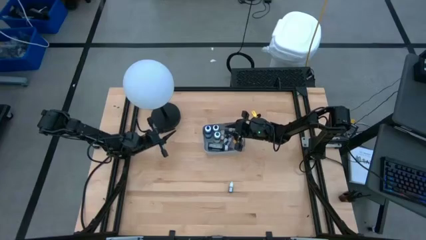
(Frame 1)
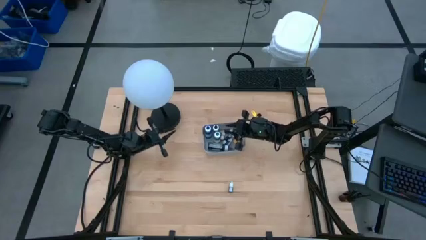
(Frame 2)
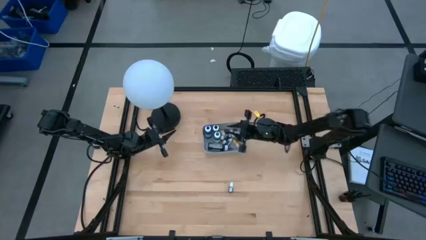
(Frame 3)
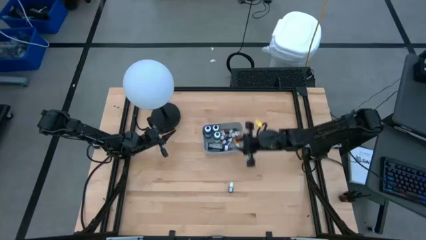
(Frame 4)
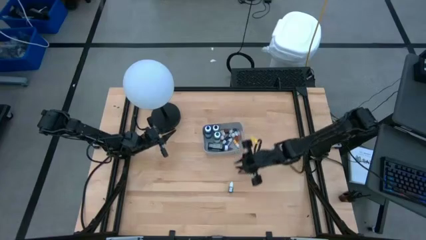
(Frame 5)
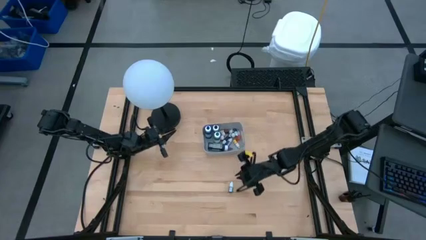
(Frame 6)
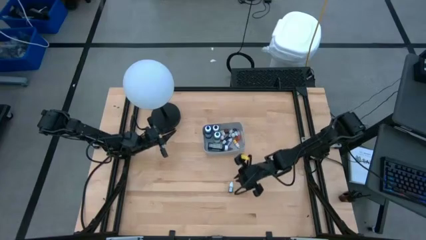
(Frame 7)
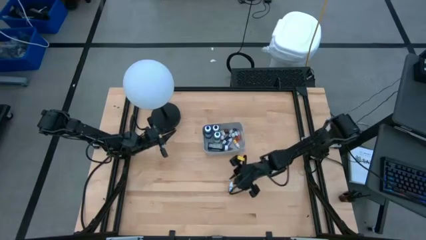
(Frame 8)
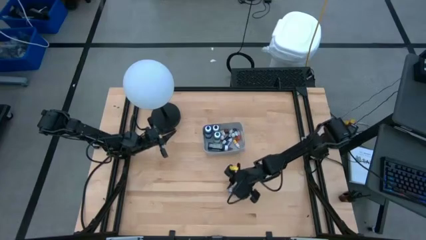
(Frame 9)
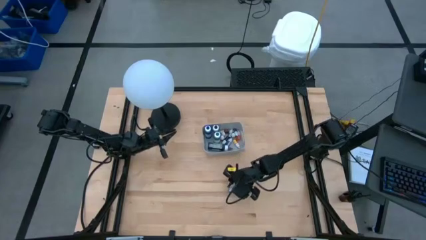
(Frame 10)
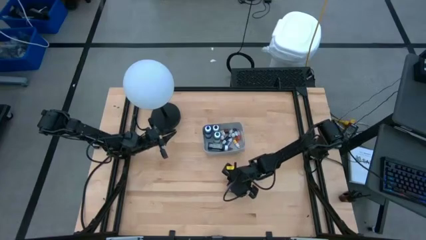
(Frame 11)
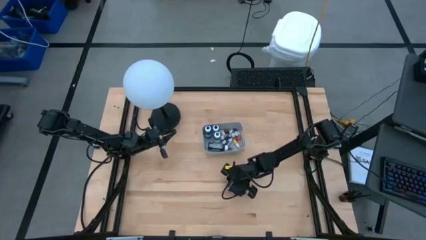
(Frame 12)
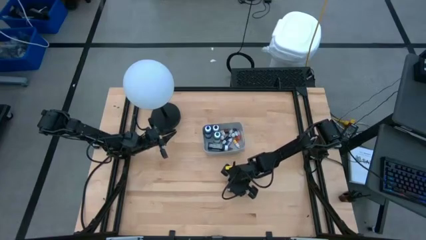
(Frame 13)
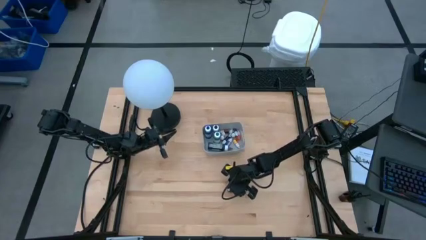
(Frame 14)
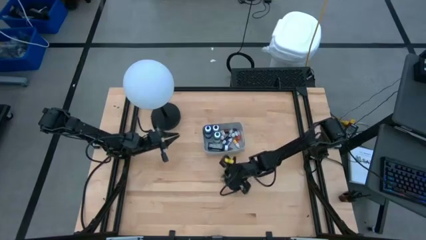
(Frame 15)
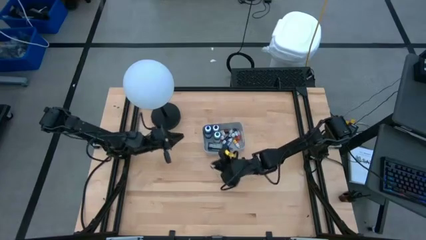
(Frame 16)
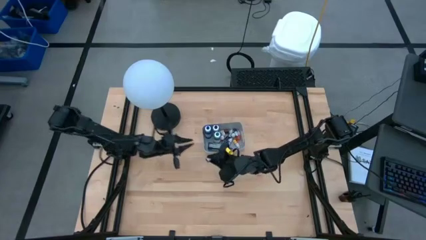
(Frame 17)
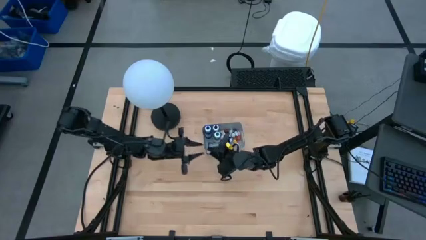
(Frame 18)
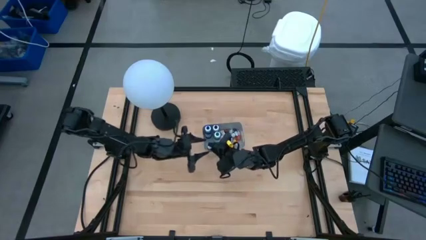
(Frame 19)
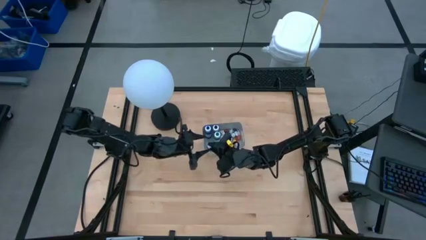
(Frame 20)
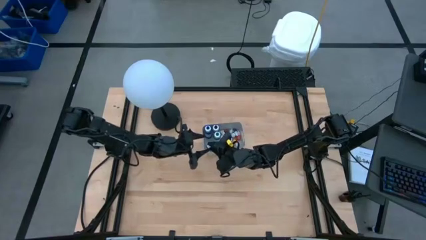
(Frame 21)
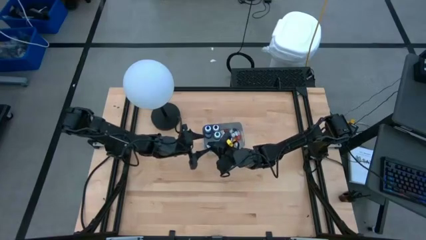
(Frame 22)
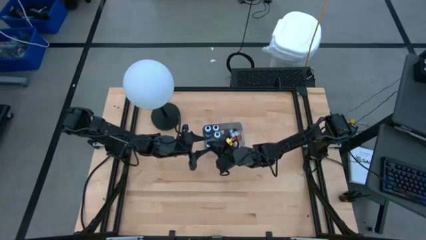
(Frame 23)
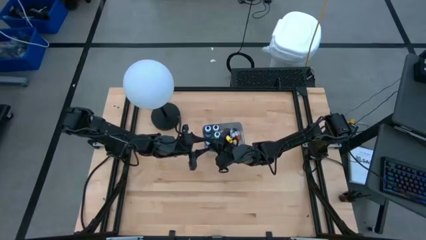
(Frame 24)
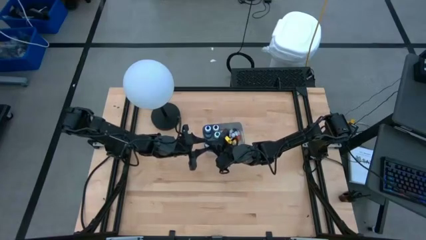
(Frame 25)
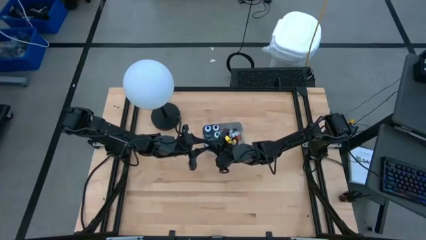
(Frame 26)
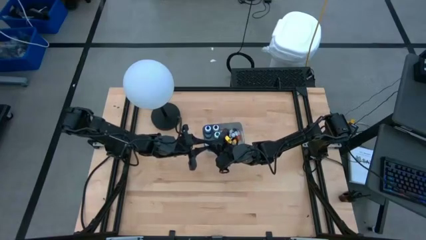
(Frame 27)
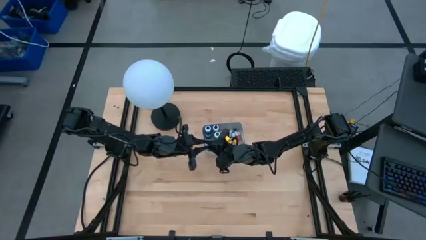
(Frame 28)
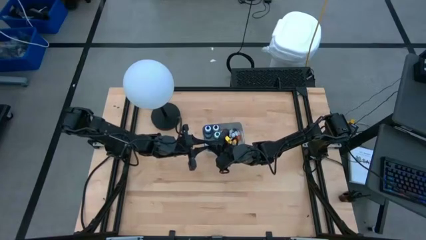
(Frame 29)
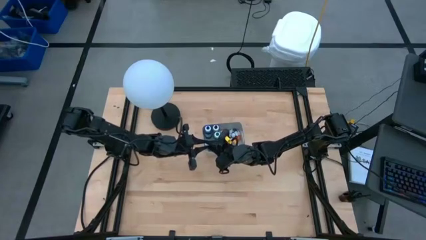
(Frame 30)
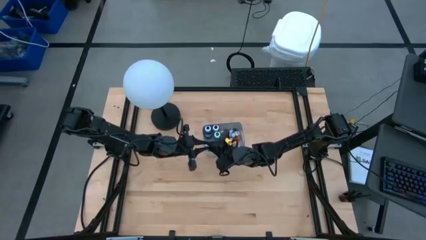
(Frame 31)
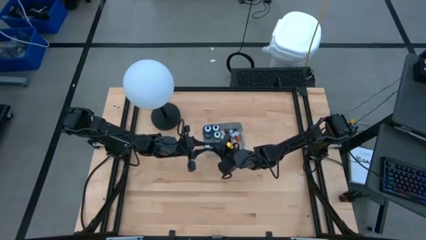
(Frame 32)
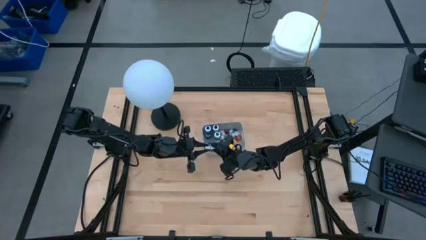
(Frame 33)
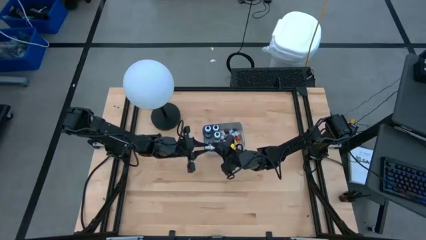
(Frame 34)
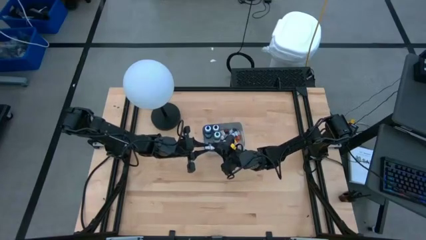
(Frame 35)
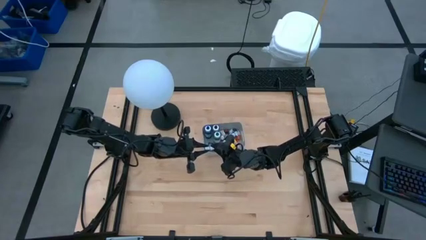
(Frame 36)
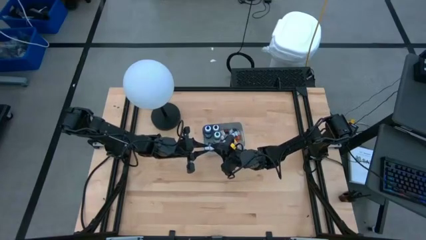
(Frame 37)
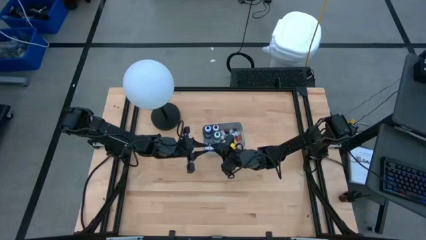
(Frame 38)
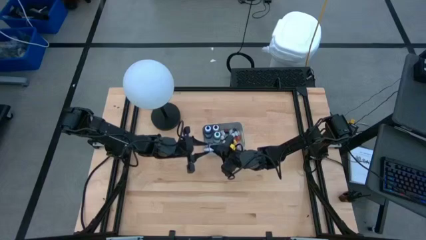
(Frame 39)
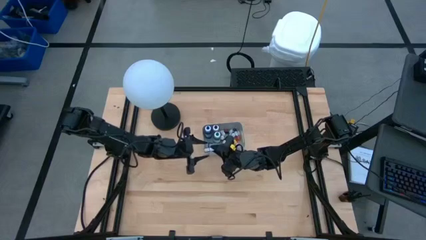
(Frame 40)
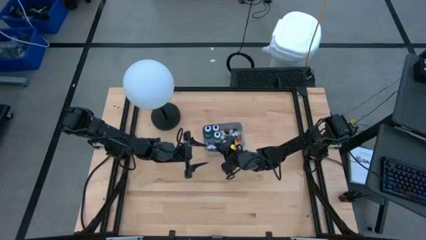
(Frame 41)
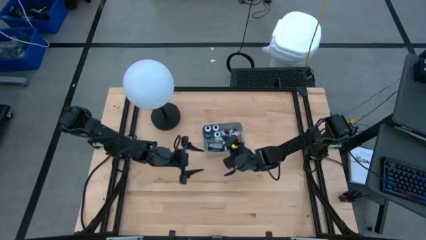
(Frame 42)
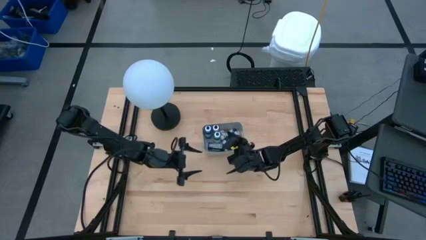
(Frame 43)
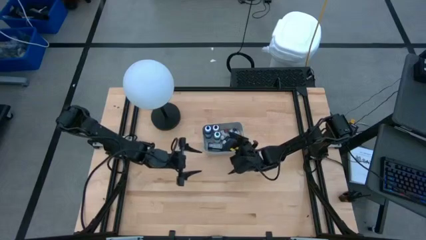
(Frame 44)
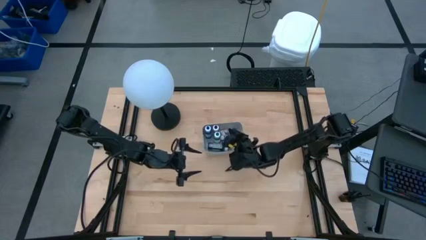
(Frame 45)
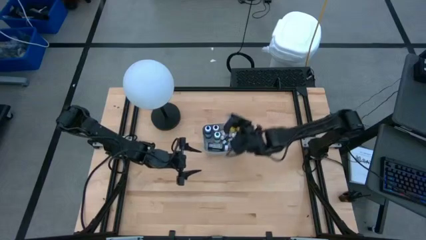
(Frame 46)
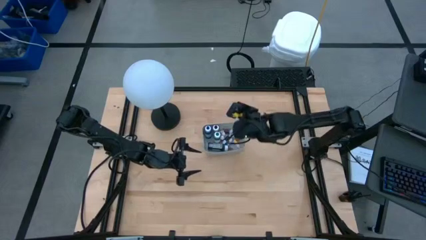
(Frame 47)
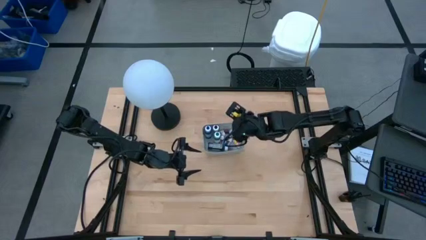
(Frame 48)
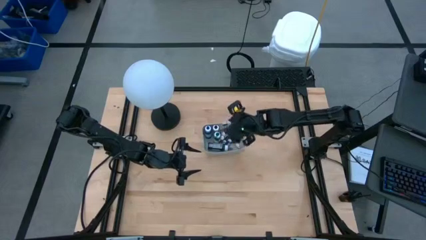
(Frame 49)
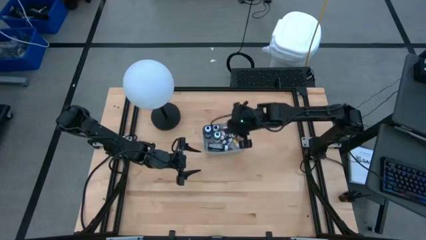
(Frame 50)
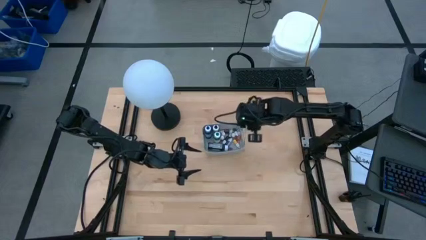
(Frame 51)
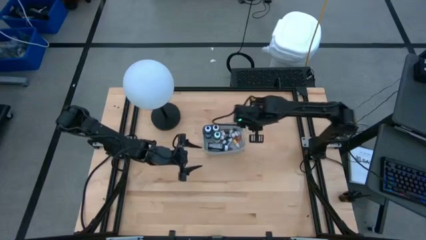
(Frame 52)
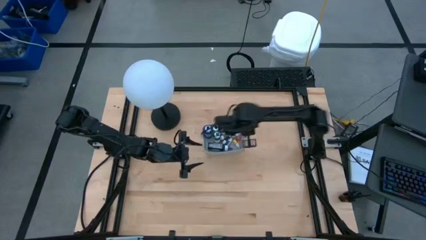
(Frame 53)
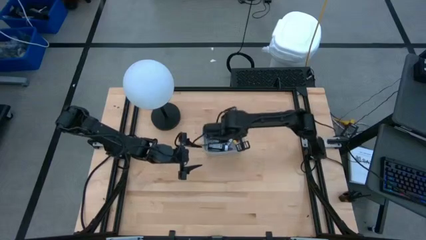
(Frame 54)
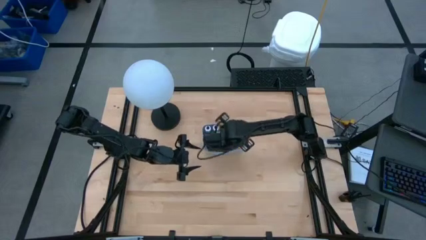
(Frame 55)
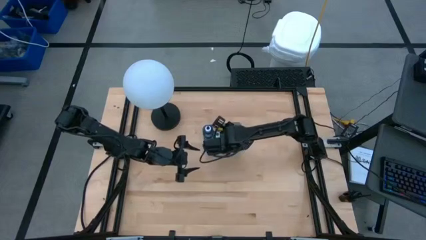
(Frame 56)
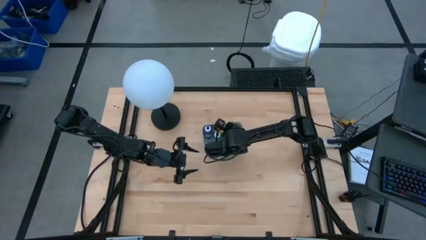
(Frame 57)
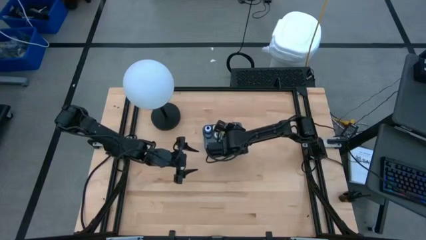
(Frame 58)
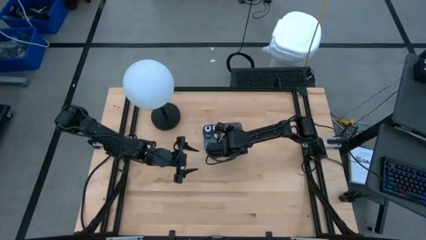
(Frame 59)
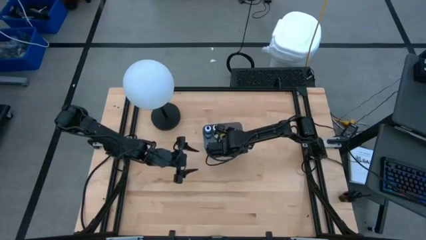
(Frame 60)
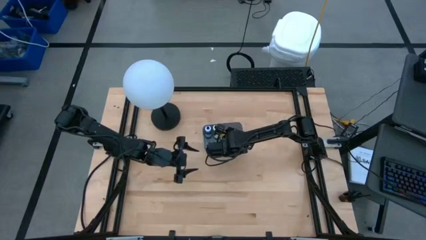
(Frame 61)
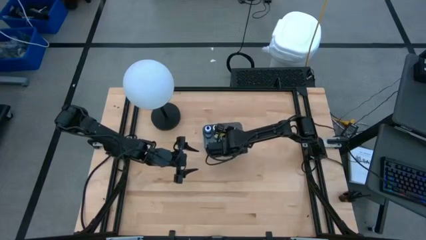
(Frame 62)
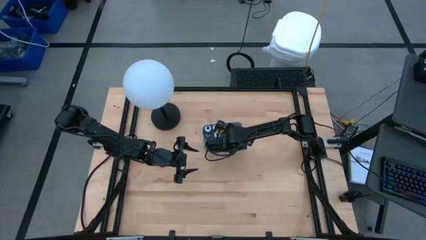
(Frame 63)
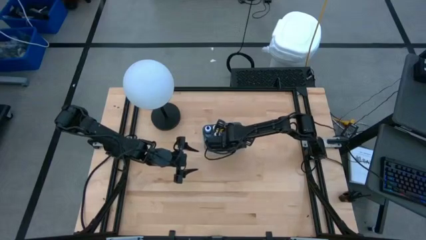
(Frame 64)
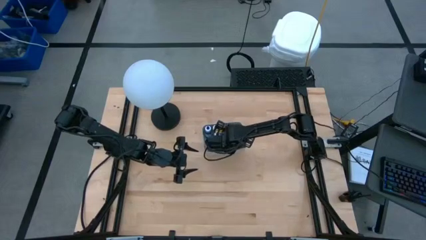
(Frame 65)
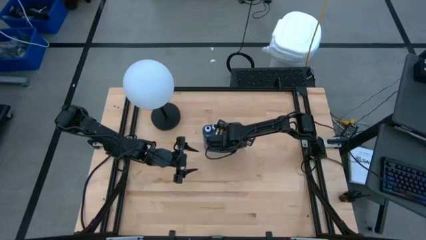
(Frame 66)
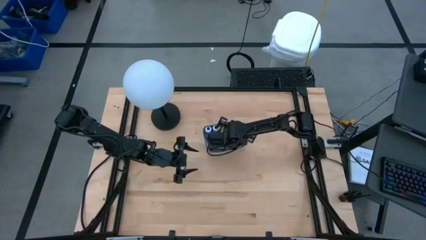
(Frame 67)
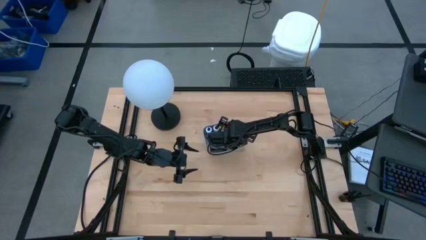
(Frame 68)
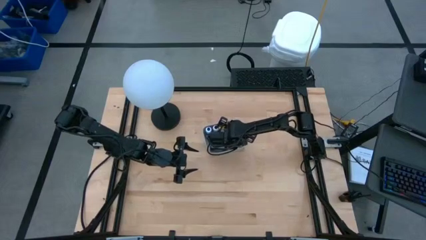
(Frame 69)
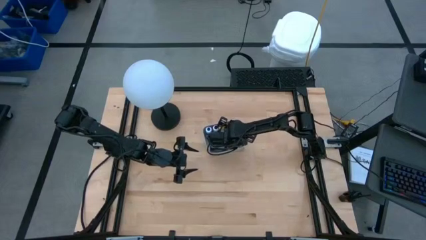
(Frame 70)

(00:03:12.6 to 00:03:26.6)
Task: Pick & Place food coloring
Put the small purple food coloring bottle into the gray bin

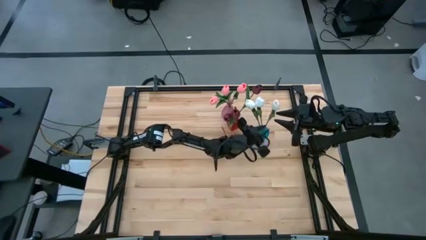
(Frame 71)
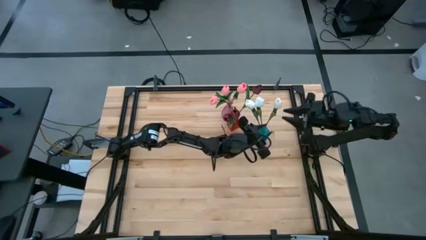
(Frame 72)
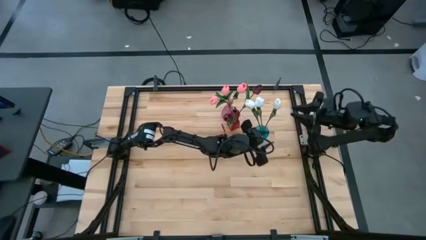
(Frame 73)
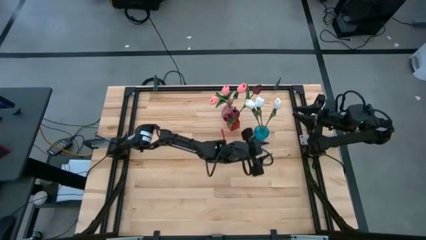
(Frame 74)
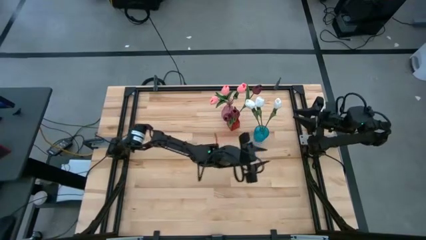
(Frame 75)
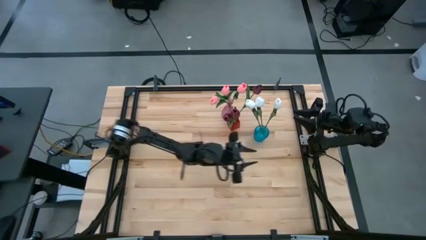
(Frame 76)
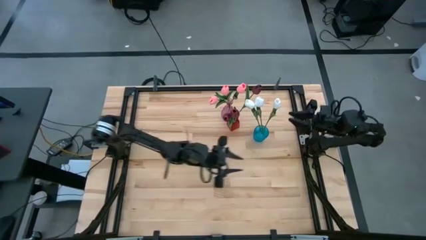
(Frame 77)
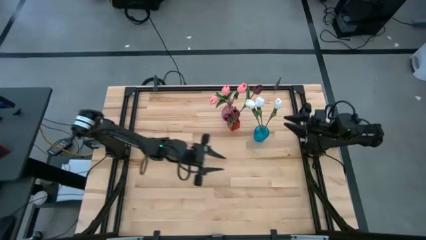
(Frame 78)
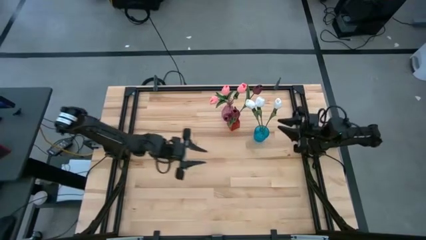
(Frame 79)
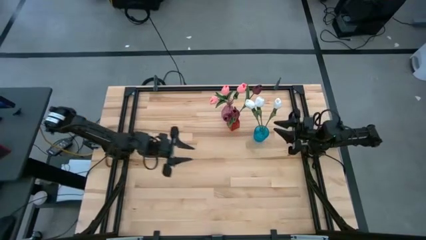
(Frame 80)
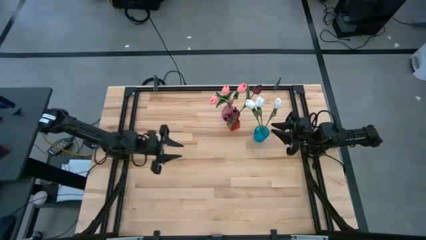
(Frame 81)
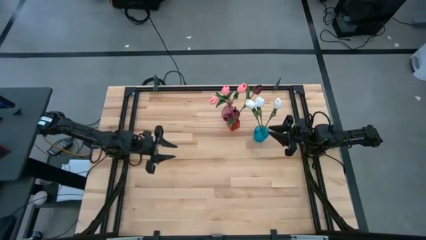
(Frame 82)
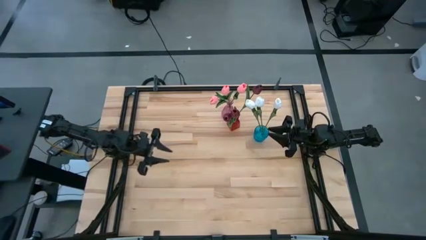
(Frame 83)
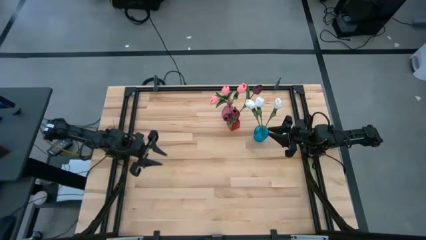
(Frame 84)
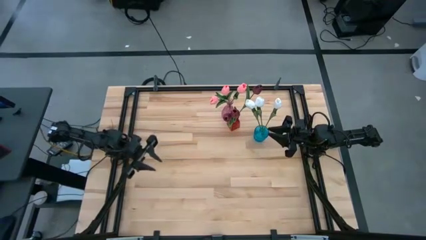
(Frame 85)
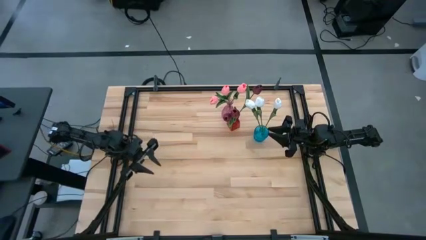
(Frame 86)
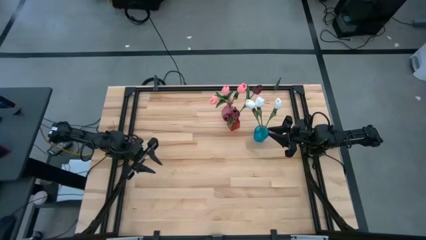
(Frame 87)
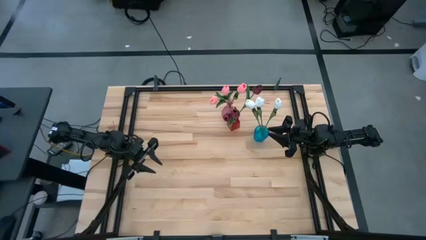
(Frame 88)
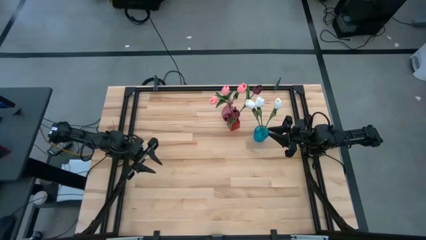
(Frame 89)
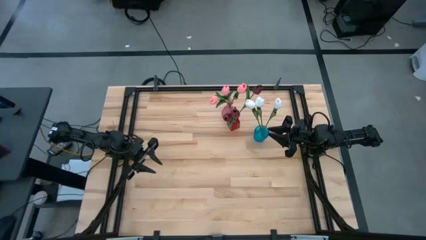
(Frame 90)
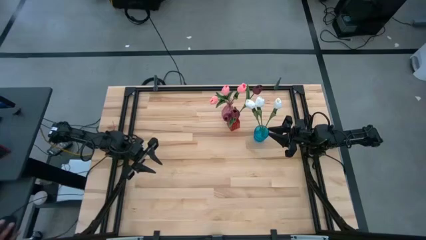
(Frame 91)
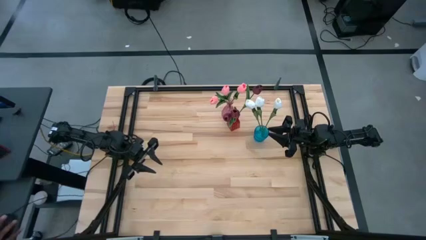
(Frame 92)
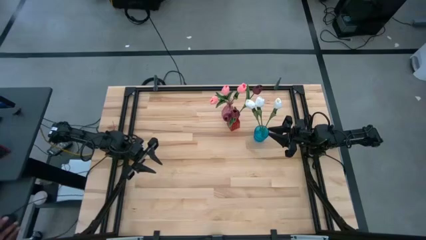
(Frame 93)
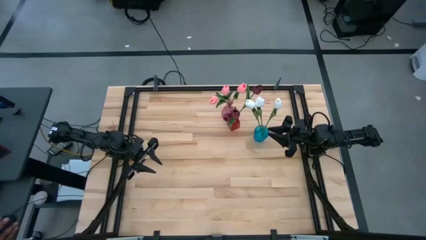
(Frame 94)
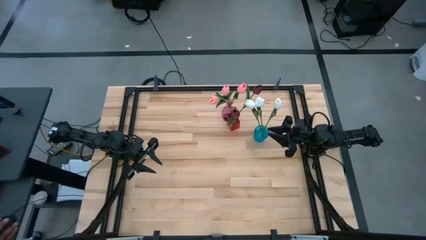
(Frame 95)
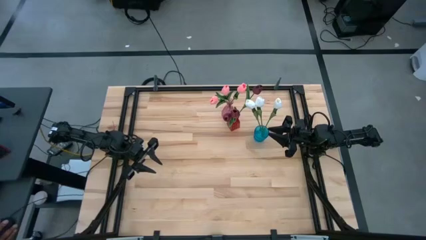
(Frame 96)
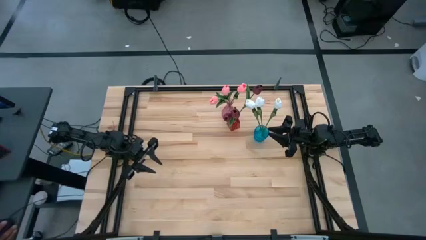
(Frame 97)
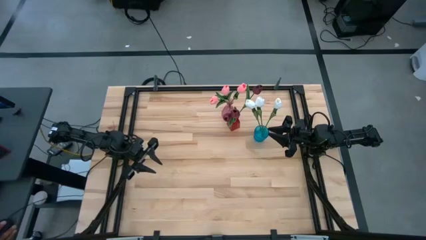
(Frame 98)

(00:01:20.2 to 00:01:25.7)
Task: Sort flowers into vase by color
Return to Home Position
